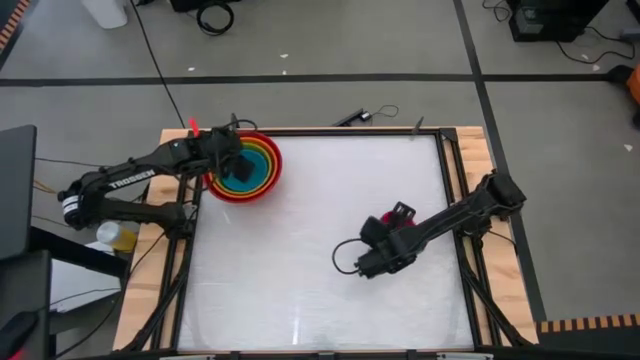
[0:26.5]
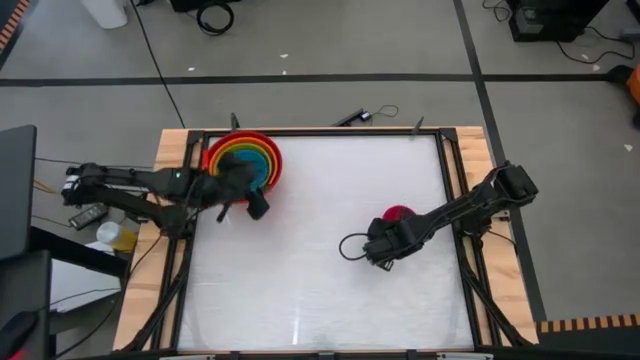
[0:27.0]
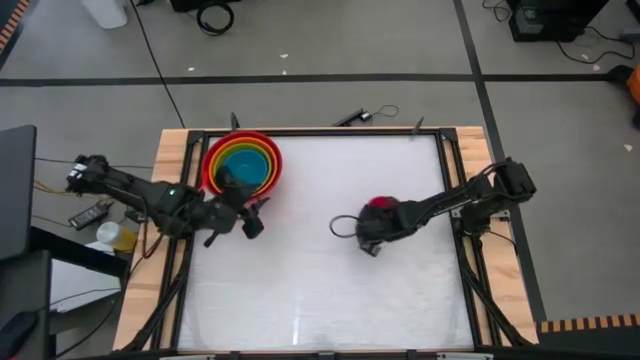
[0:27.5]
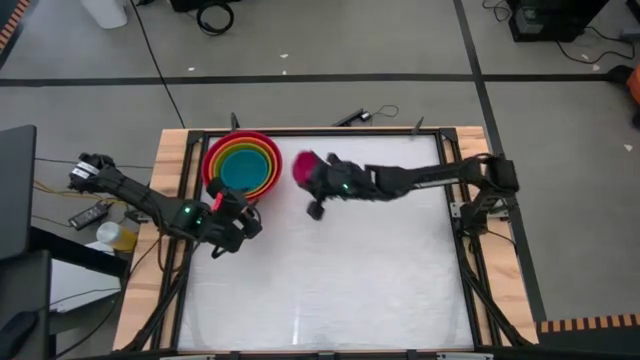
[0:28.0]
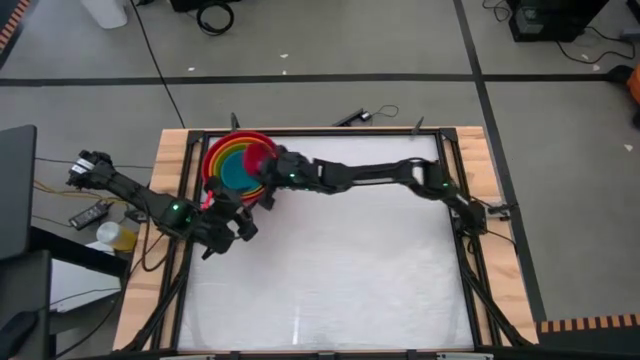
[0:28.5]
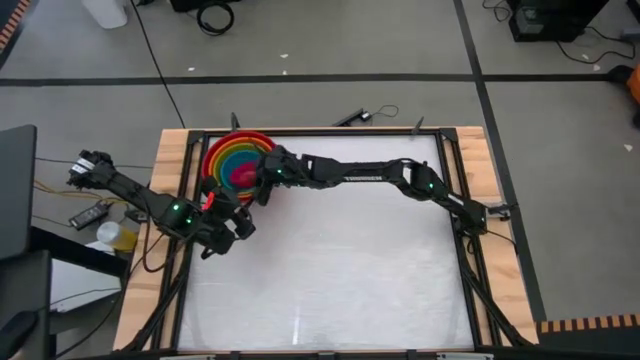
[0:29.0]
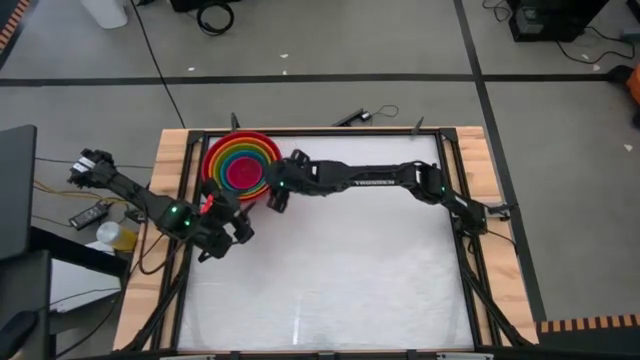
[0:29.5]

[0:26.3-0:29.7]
Stack the pink bowl into the blue bowl

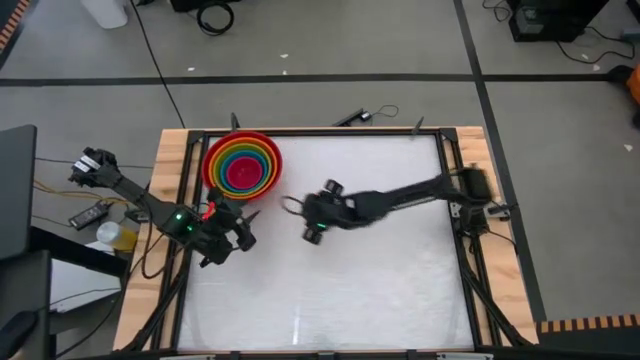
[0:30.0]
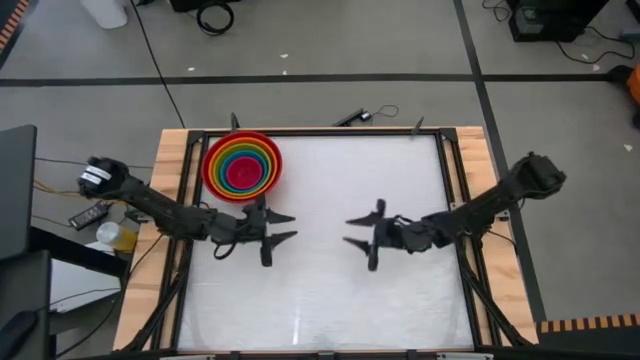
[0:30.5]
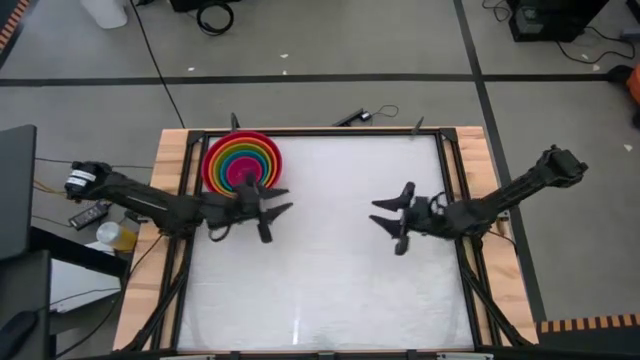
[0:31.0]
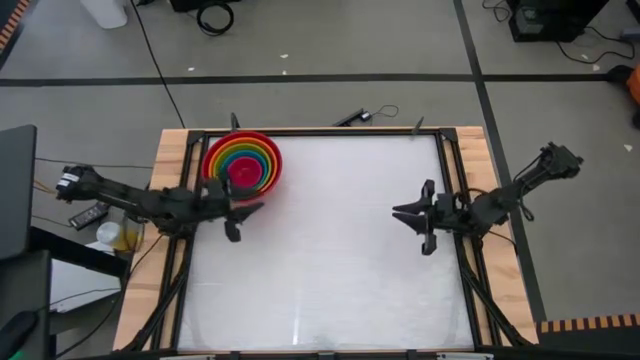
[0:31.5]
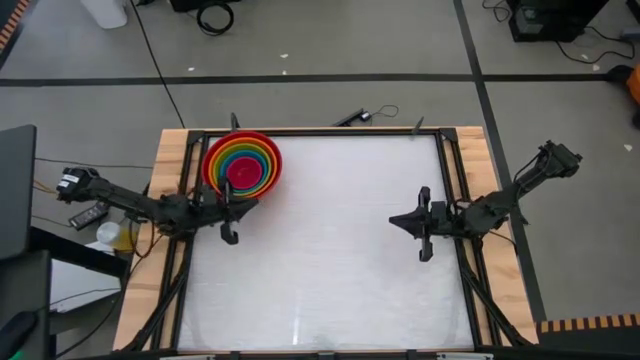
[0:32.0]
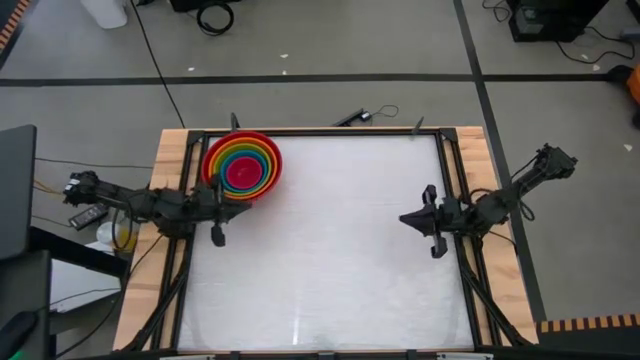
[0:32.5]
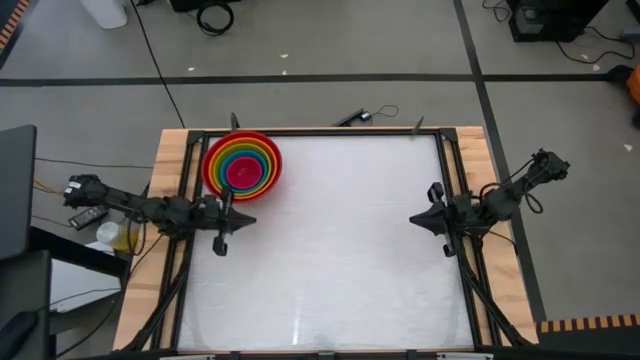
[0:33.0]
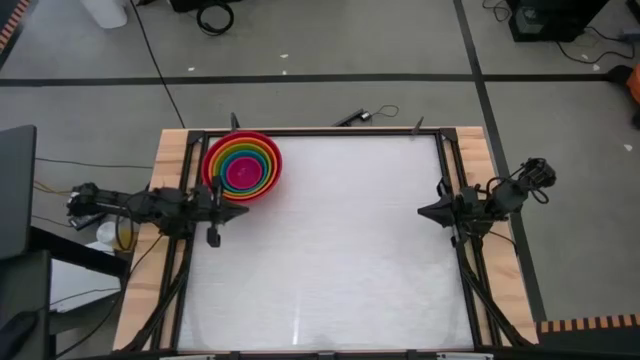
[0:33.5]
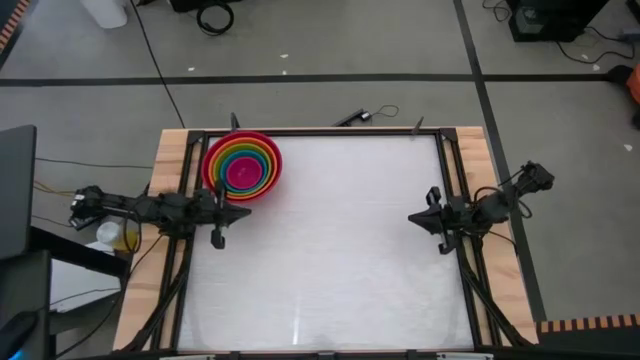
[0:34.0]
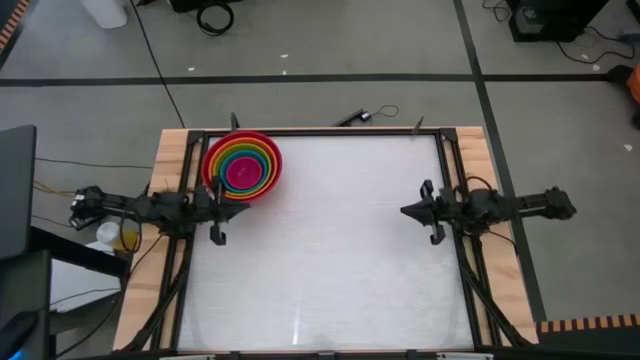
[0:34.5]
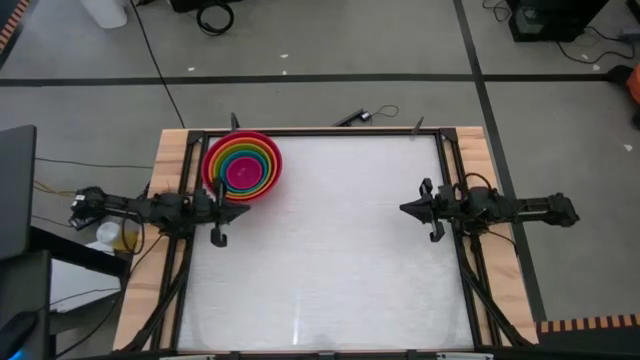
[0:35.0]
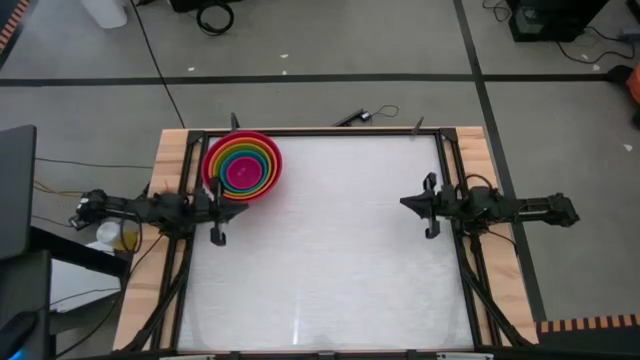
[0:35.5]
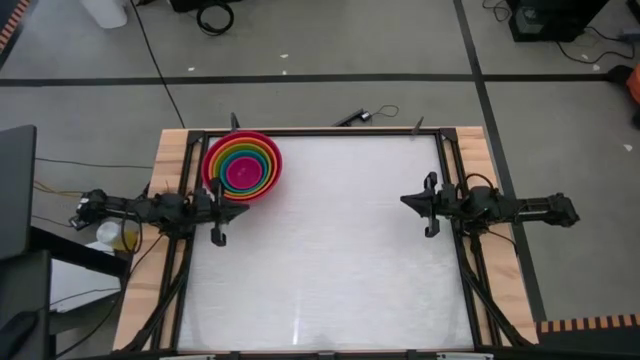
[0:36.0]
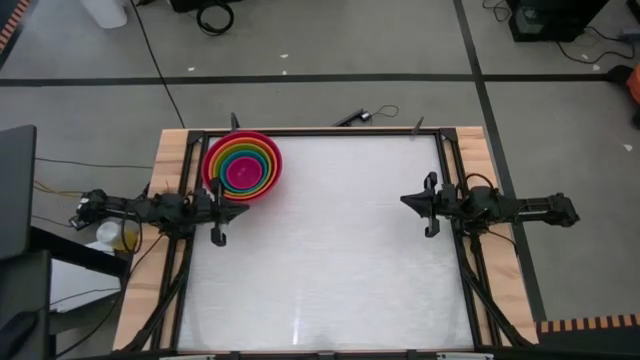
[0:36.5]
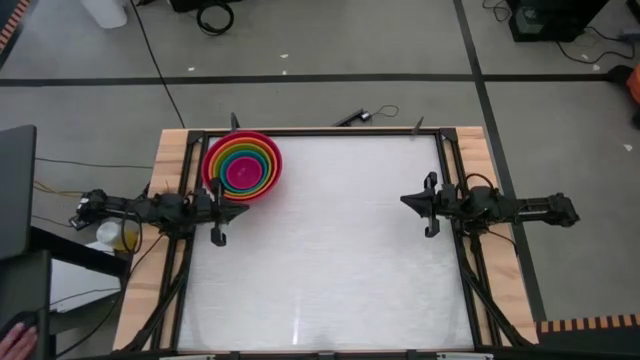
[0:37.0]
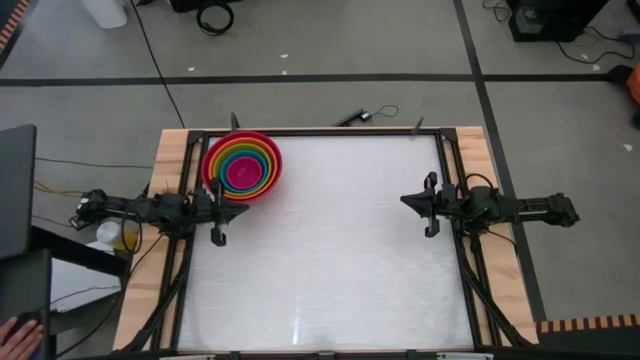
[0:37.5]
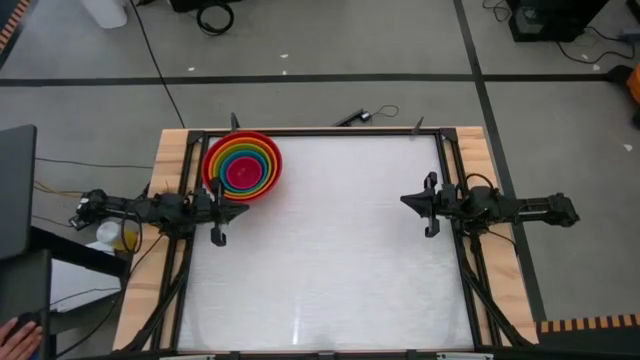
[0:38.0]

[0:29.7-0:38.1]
Return to Home Position

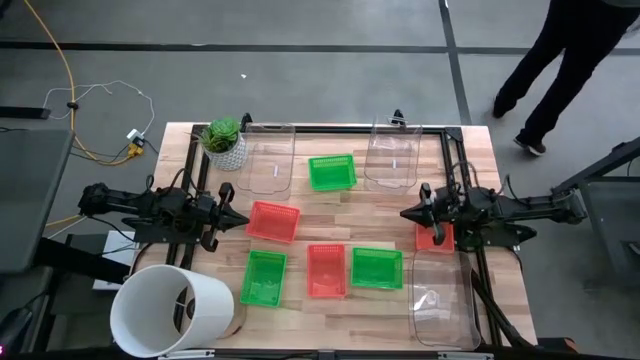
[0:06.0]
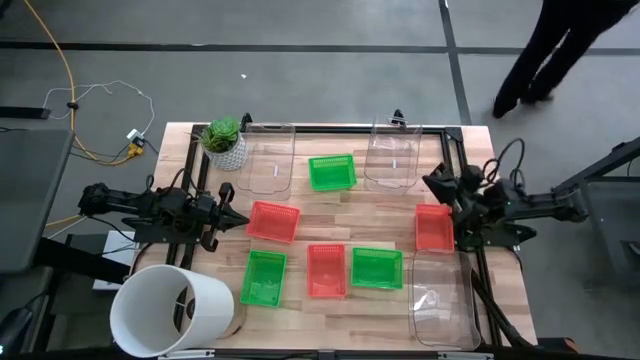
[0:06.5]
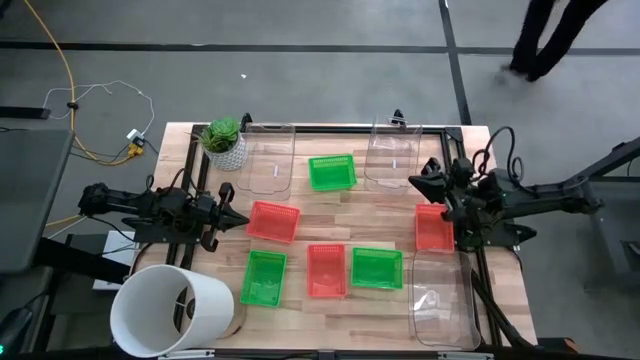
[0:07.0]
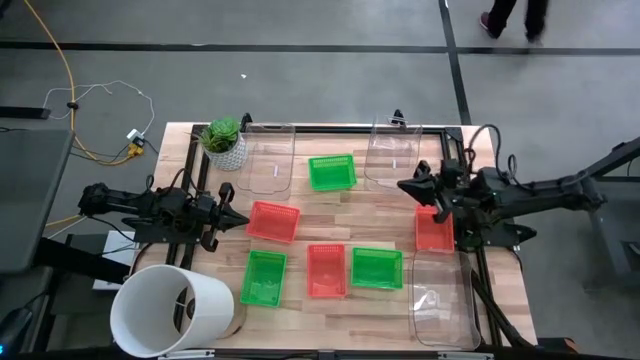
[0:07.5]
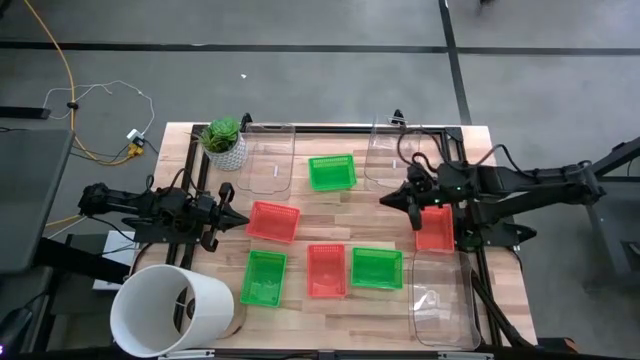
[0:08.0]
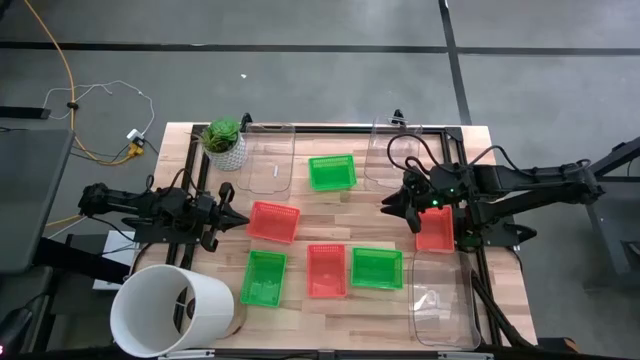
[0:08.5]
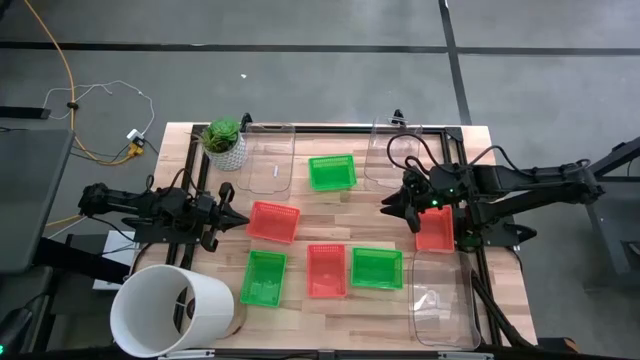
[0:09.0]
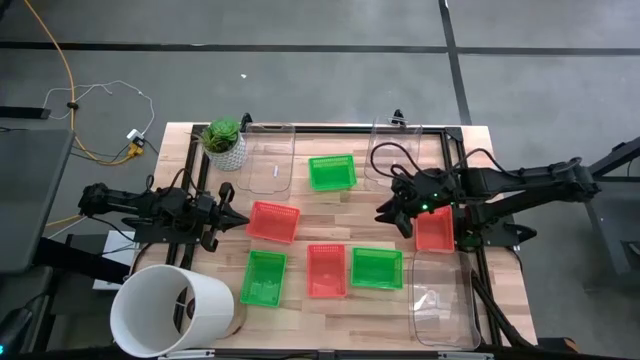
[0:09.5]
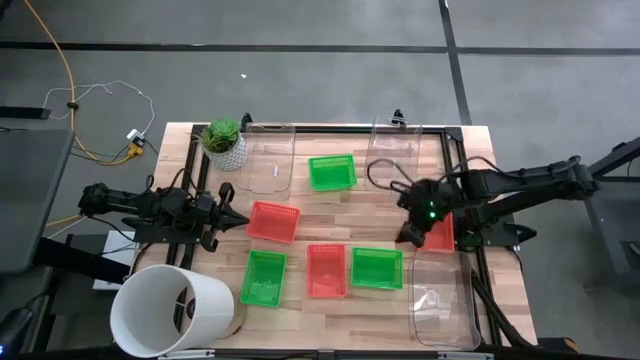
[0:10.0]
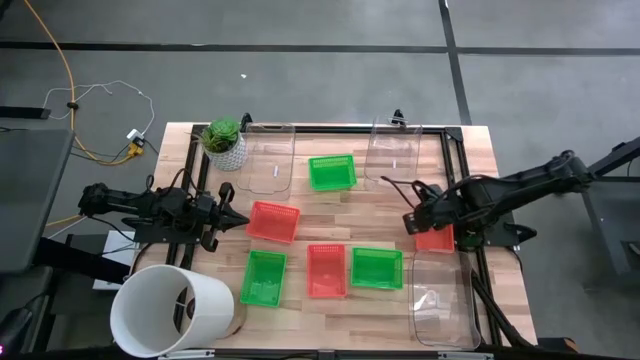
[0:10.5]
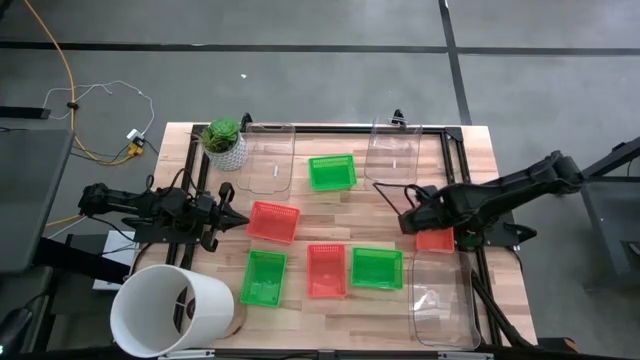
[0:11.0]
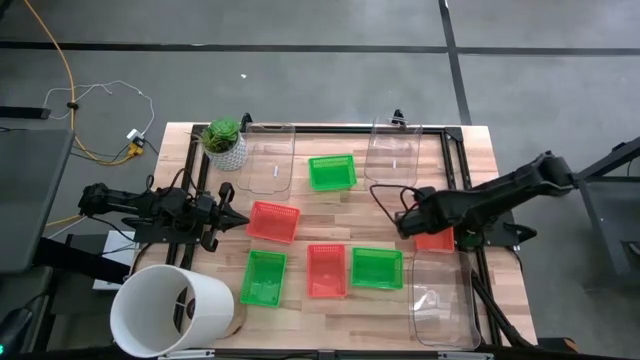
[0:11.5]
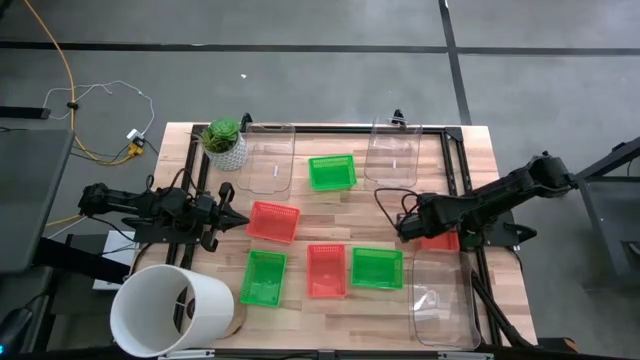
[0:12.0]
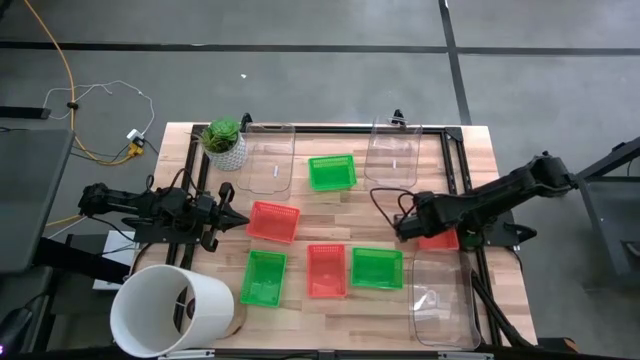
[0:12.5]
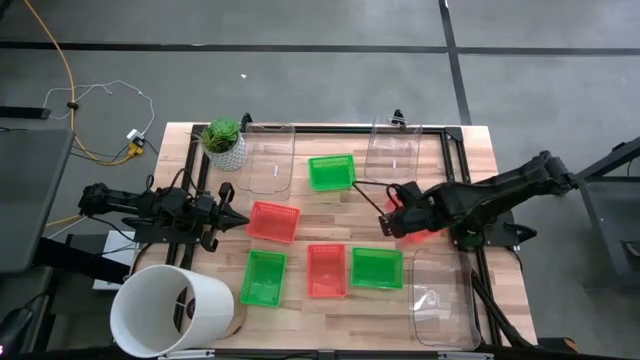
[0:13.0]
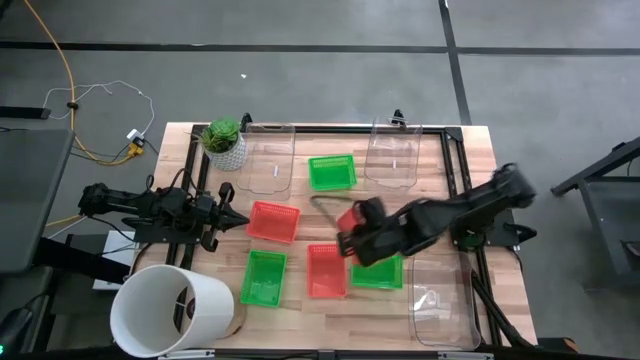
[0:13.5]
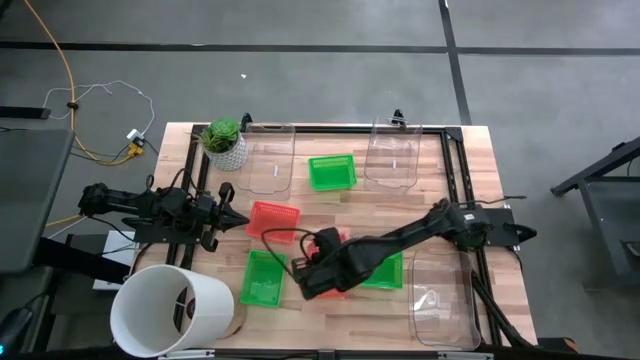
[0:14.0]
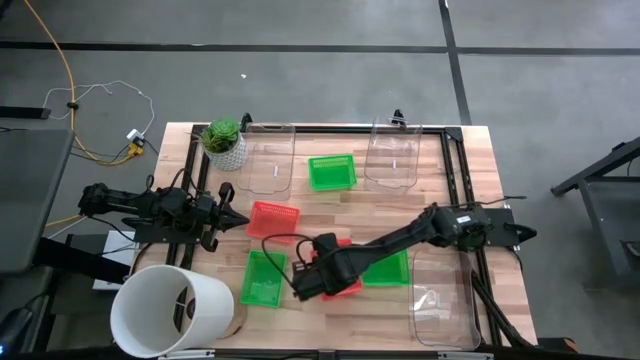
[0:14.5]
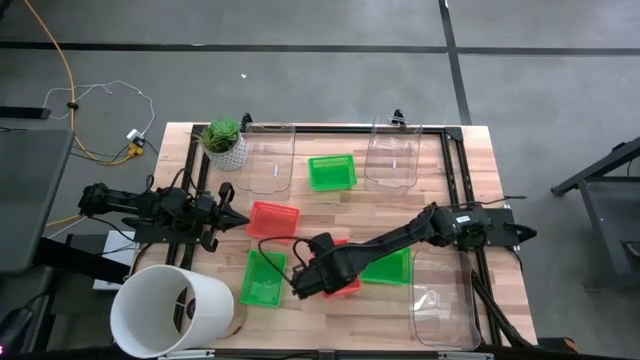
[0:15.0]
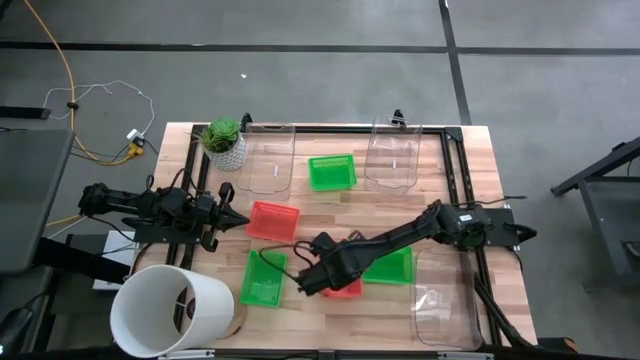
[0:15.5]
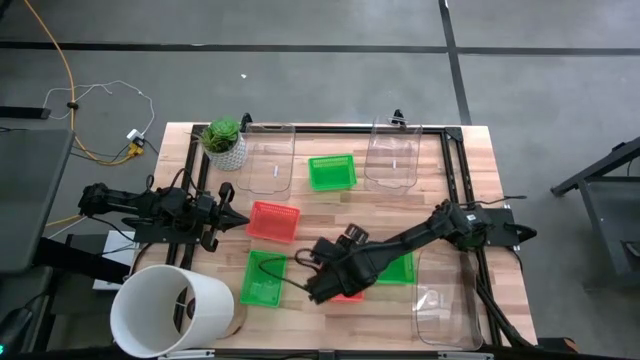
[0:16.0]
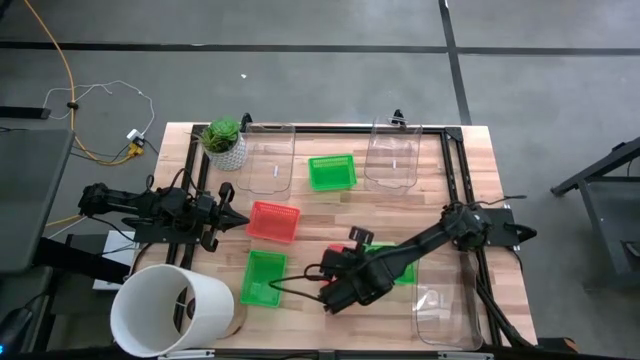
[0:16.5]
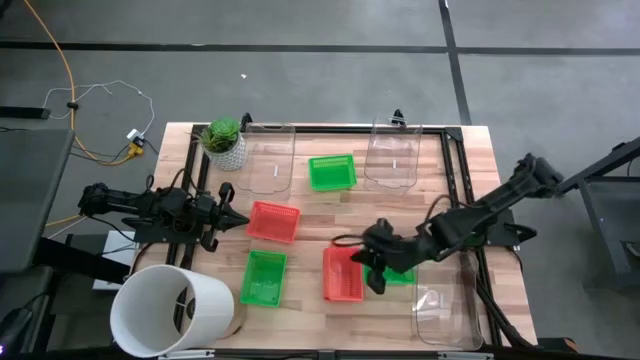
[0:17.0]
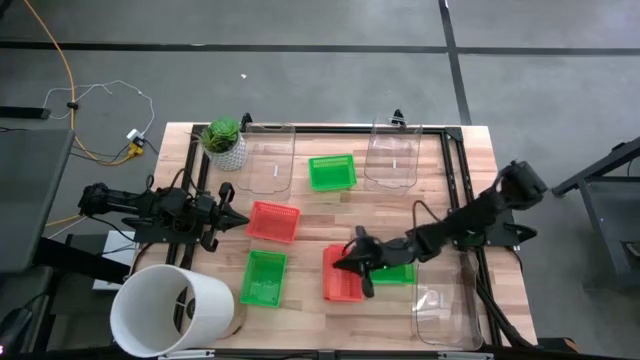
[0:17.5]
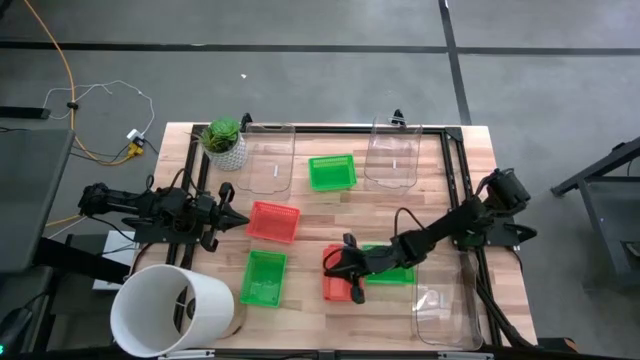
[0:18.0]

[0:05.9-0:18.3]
Stack the top right orange bin on the bottom orange bin
